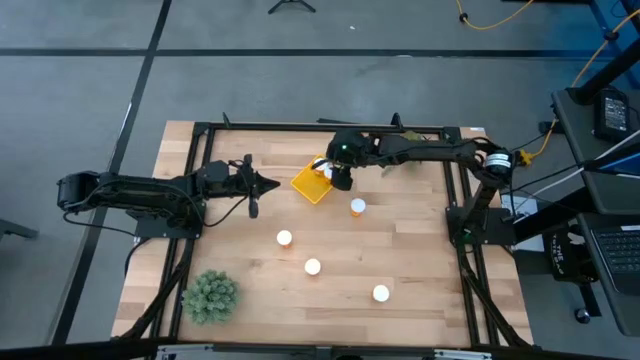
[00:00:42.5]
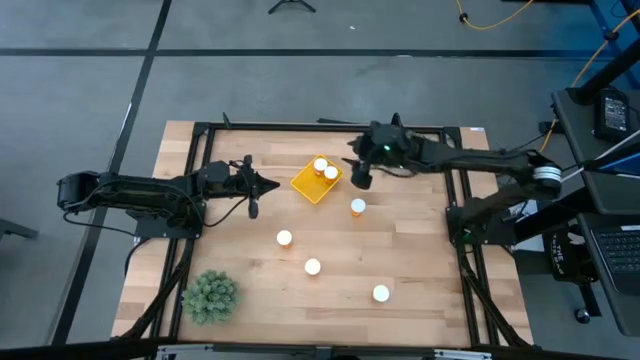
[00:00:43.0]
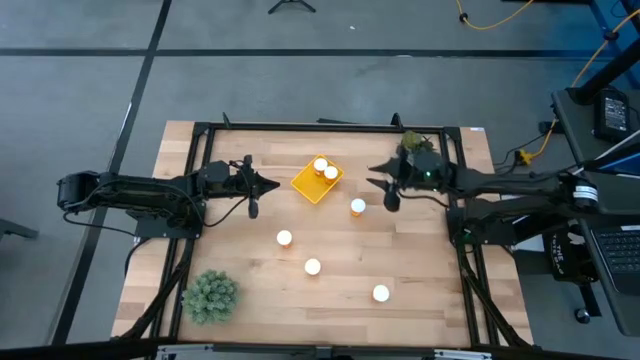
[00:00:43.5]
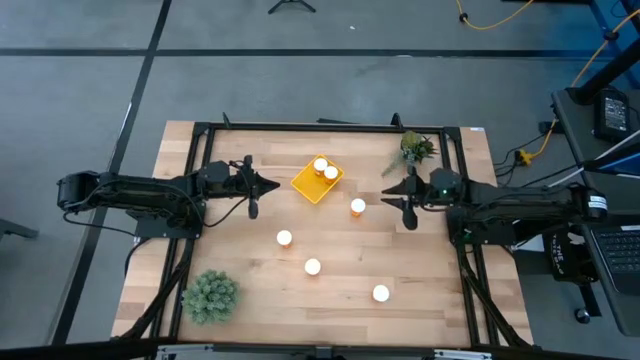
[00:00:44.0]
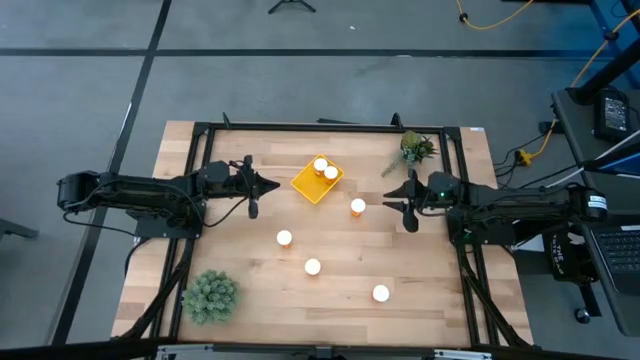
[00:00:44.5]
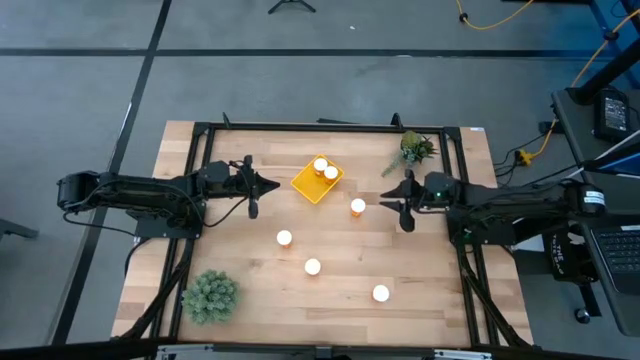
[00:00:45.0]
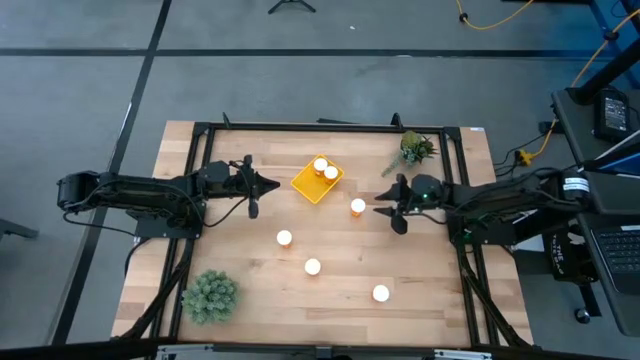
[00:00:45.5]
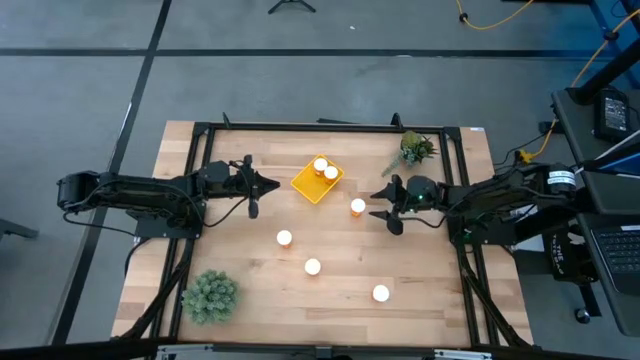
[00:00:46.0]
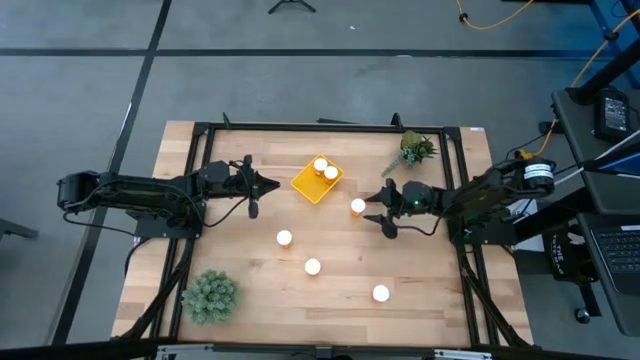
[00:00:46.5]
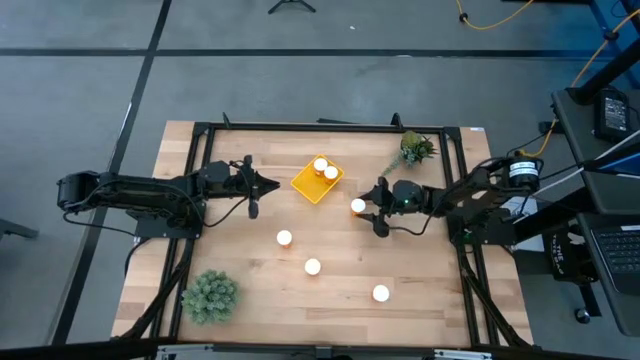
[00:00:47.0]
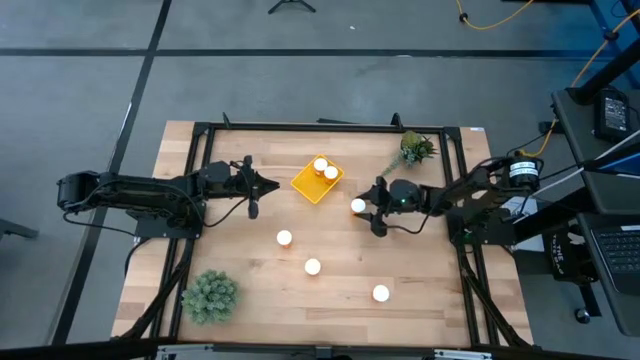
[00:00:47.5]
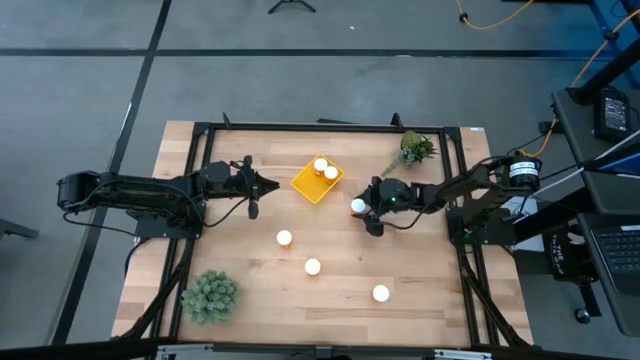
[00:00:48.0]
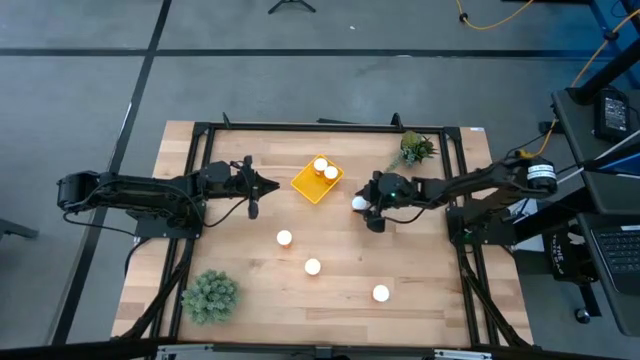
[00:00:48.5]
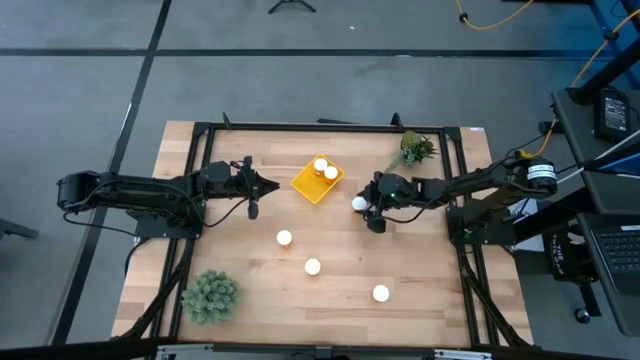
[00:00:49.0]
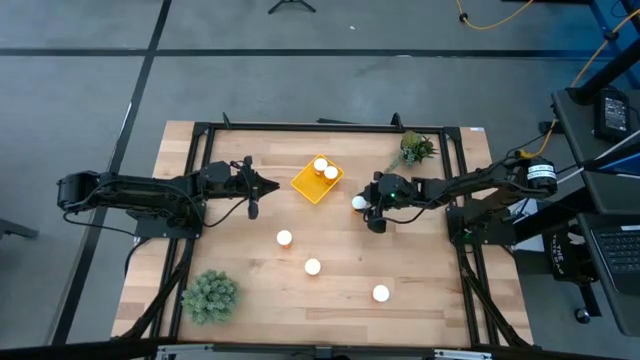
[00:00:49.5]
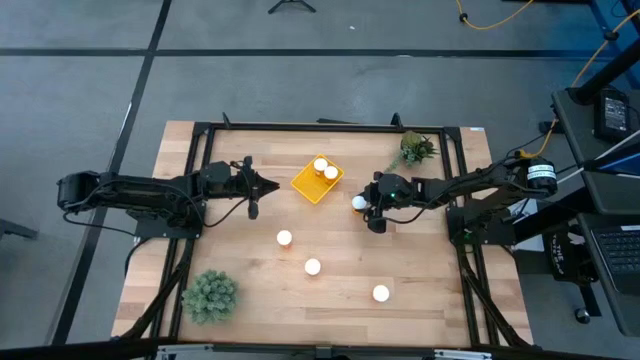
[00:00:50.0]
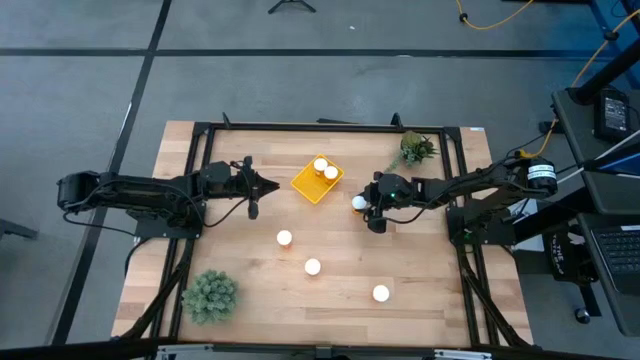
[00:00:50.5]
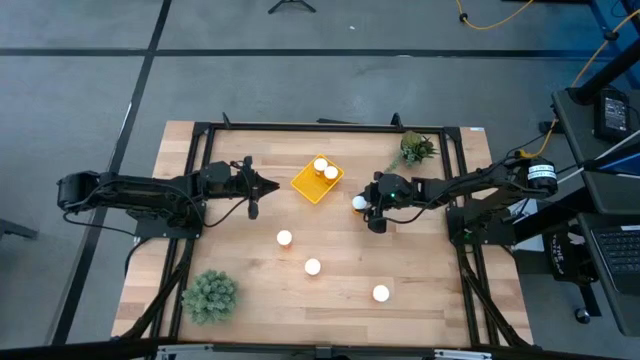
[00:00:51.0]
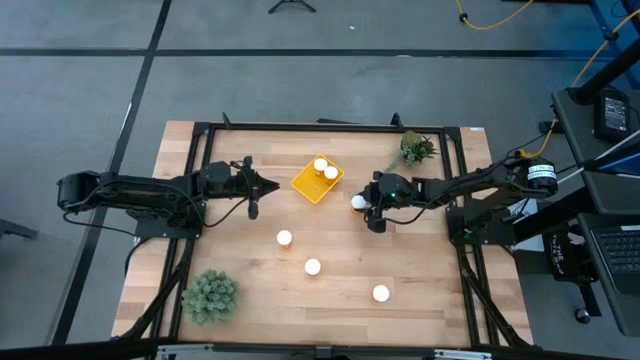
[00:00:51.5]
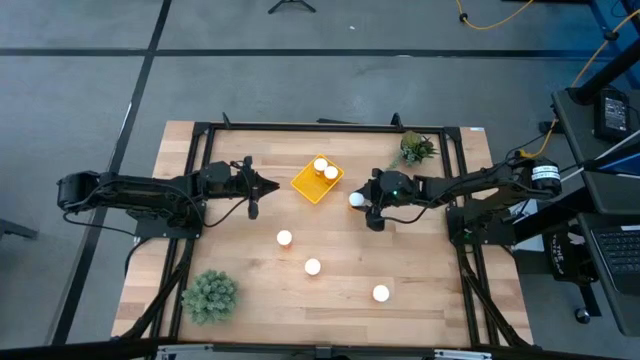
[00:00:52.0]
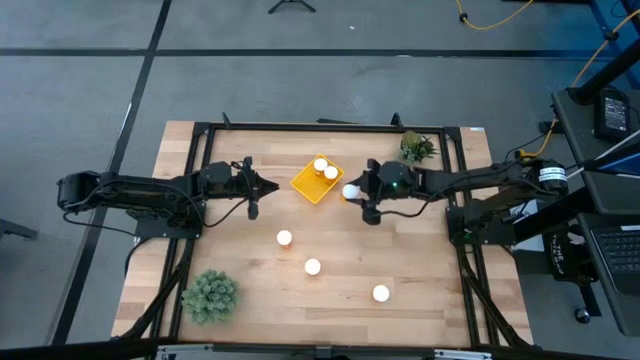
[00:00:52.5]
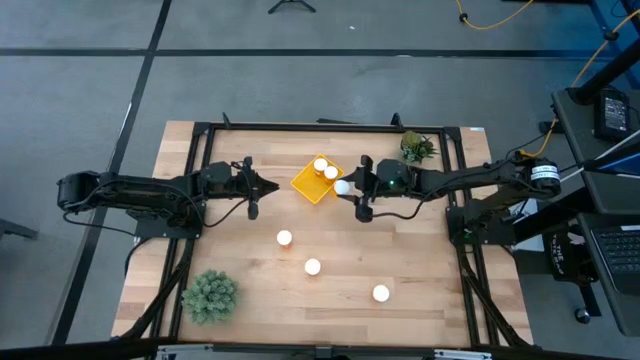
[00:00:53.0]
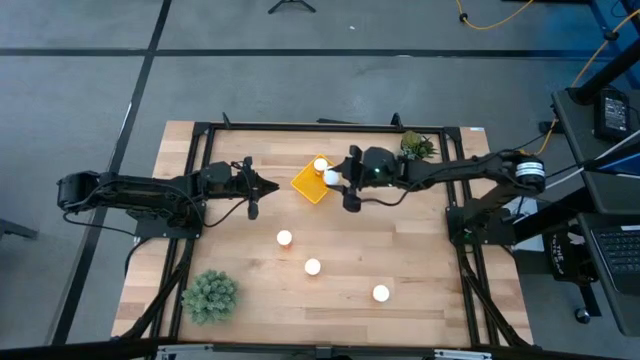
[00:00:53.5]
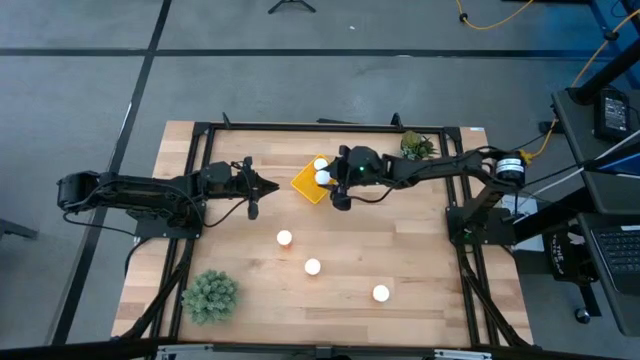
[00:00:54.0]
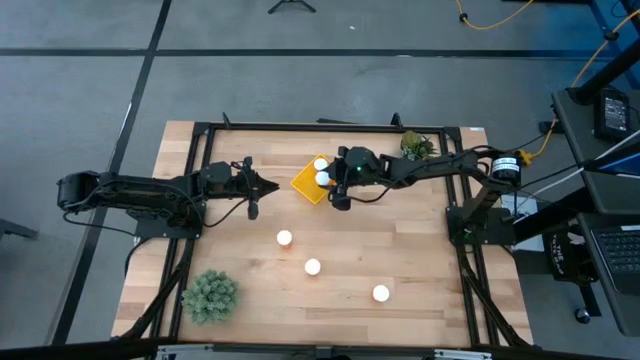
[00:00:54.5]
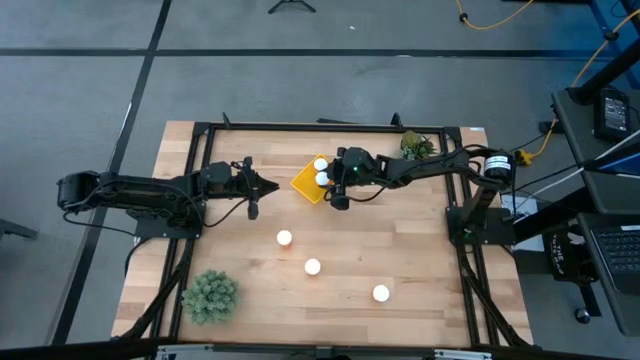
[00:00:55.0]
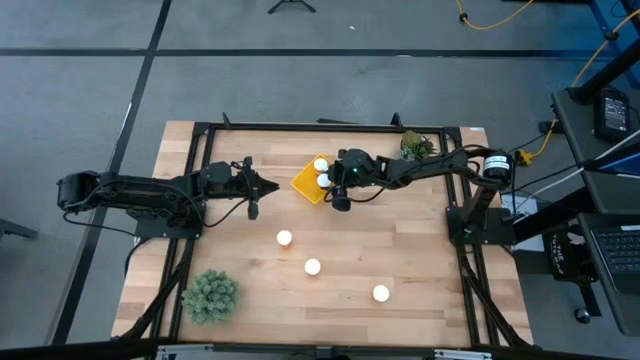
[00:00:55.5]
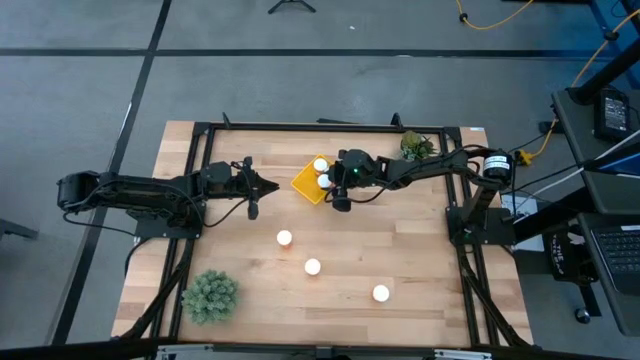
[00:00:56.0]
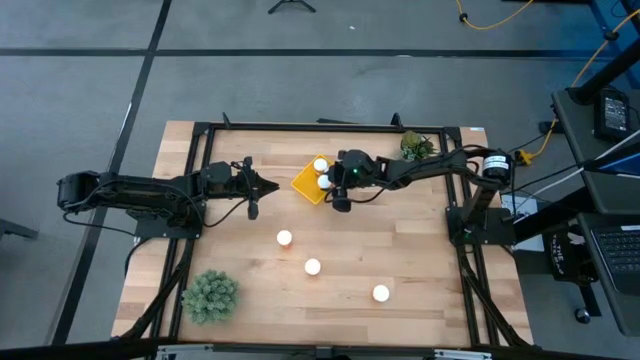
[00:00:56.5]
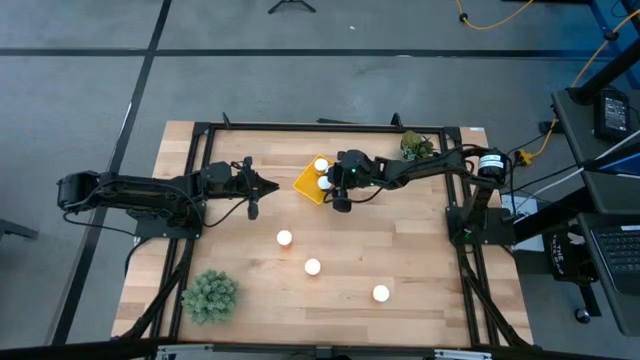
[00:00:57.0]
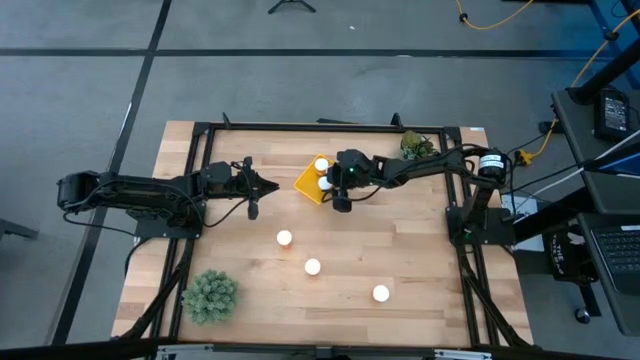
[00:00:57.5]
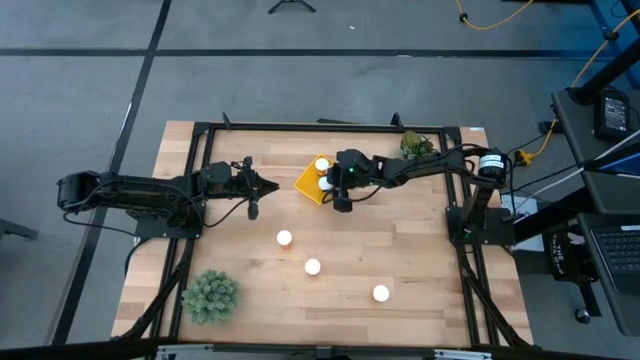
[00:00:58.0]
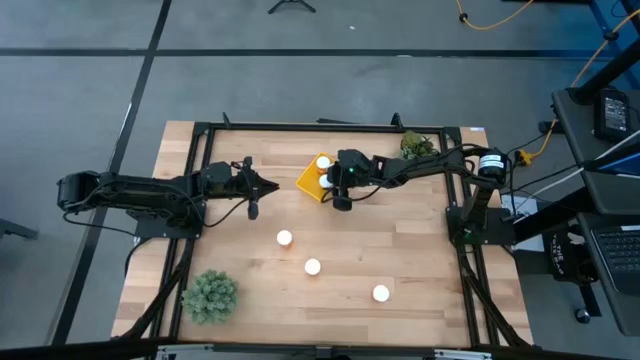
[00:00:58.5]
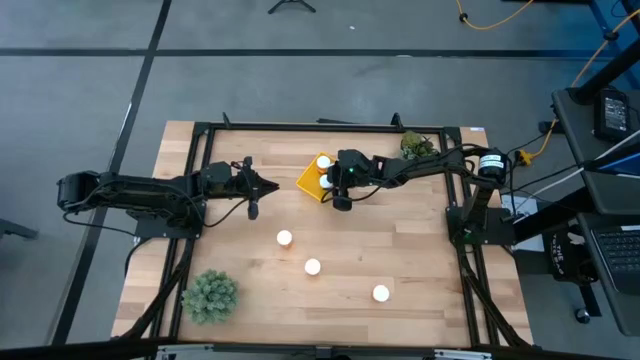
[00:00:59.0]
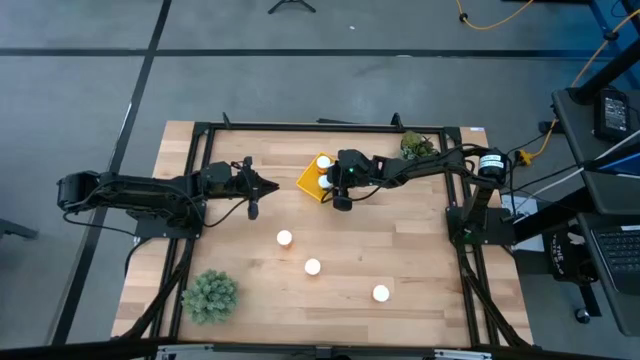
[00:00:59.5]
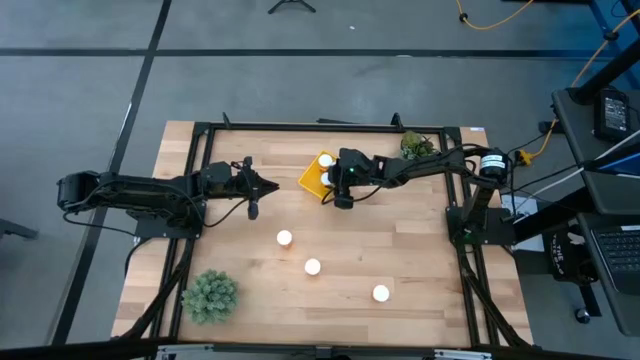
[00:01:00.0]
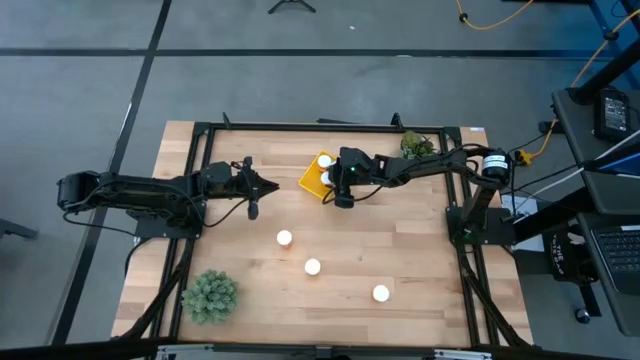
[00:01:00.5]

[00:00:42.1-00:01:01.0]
Task: Pick and place pill bottles into a basket
Put the pill bottle into the bin

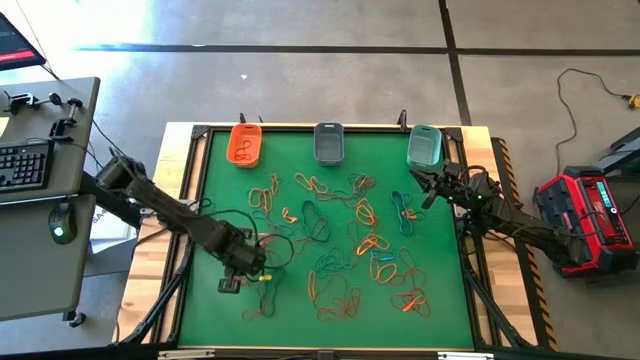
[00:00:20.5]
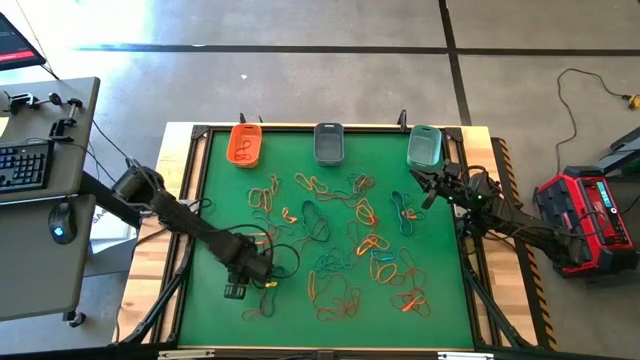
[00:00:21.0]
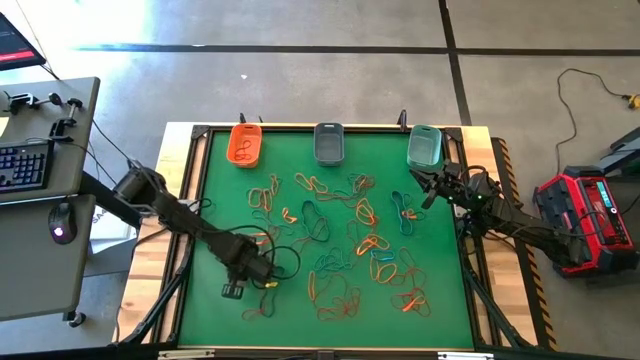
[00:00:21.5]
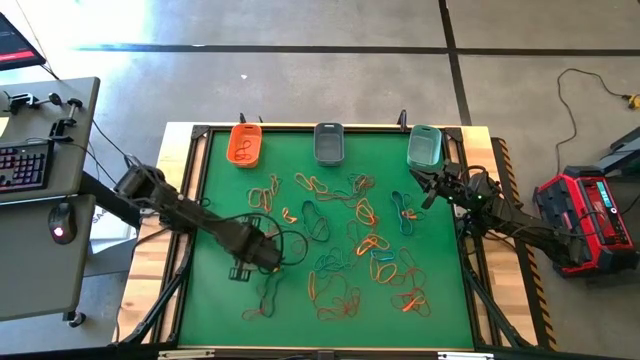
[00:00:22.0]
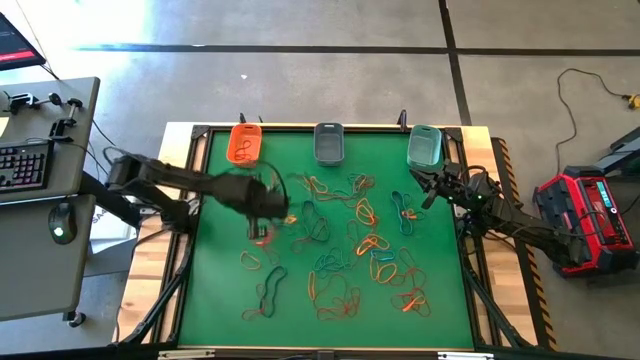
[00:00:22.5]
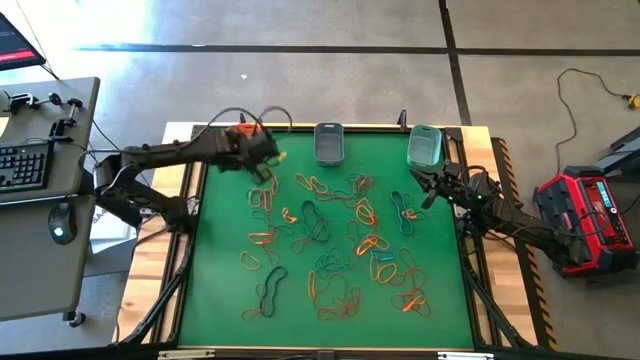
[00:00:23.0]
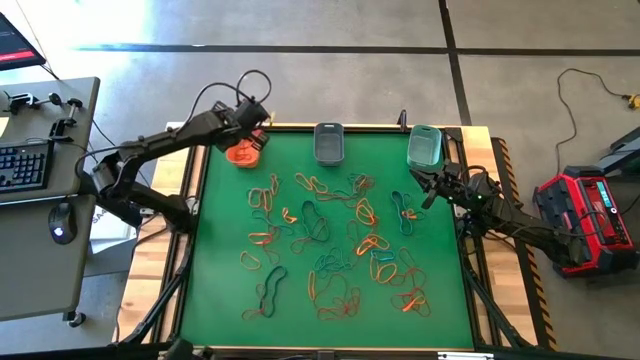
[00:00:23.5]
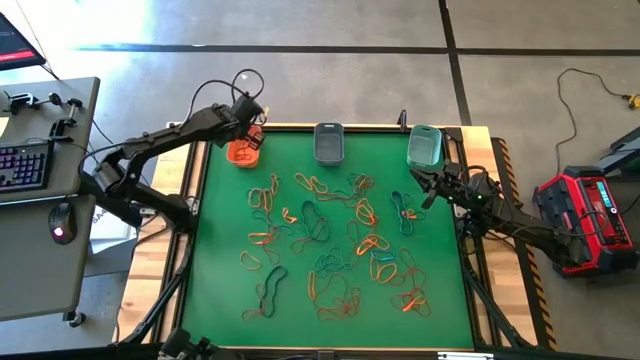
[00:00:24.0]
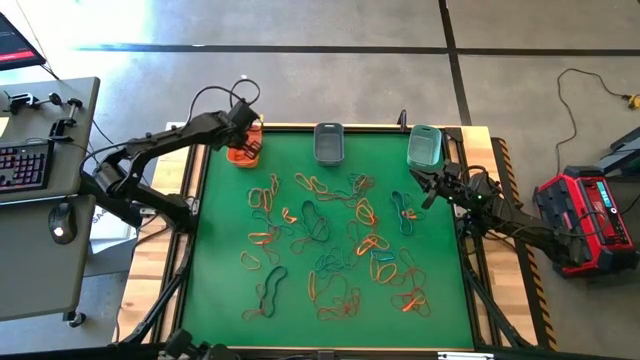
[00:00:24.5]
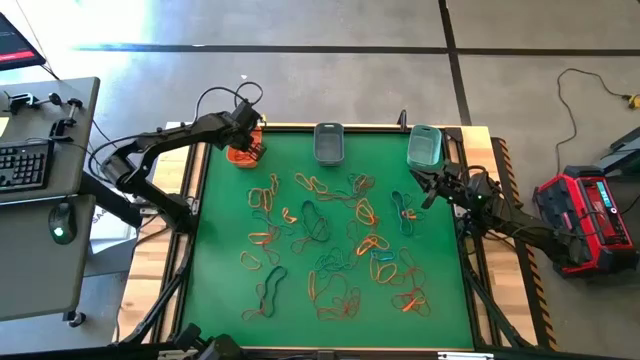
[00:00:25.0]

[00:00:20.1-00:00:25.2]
Task: Sort rubber bands into baskets
Put the red rubber band into the orange bin
